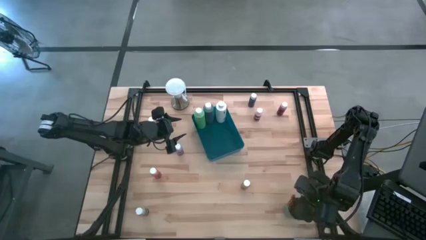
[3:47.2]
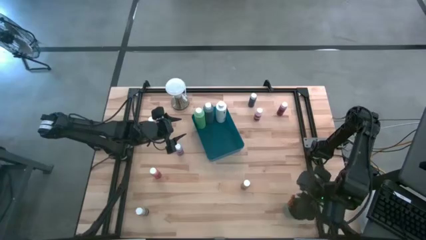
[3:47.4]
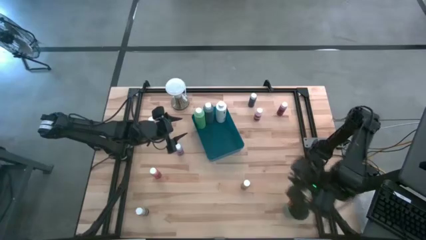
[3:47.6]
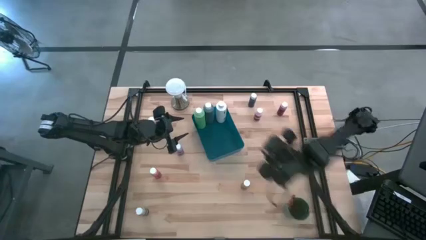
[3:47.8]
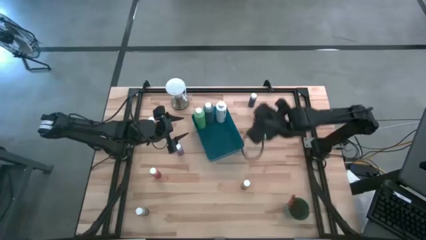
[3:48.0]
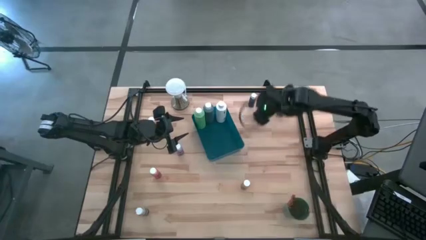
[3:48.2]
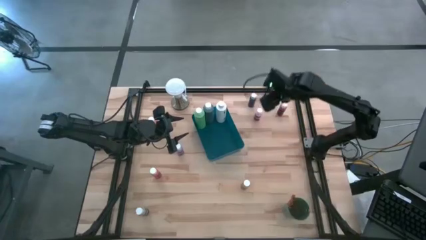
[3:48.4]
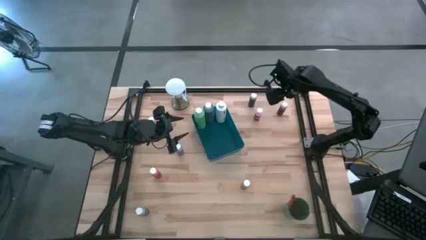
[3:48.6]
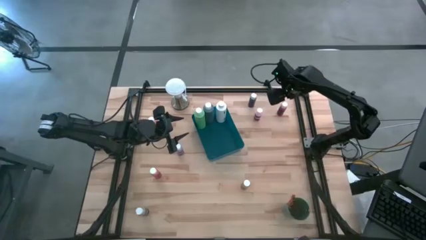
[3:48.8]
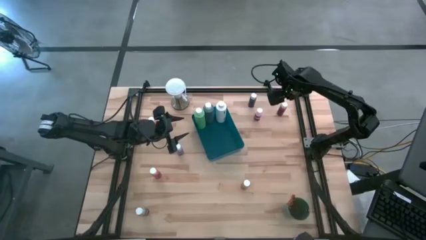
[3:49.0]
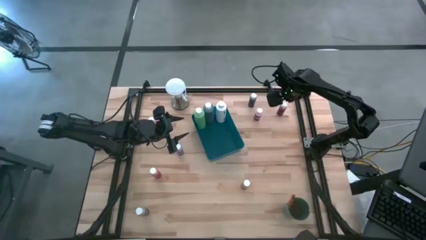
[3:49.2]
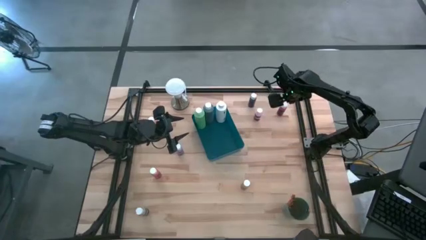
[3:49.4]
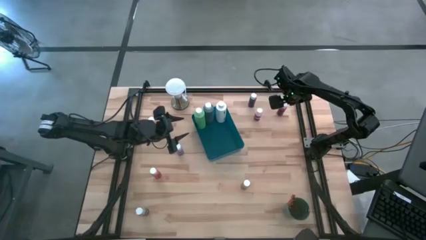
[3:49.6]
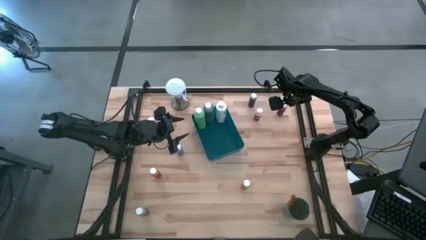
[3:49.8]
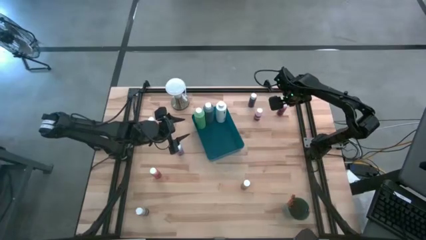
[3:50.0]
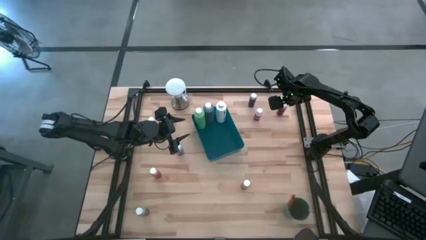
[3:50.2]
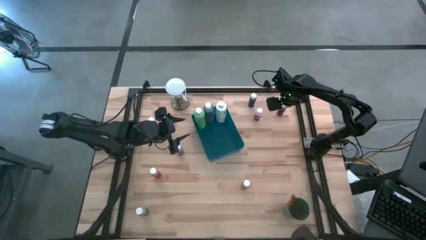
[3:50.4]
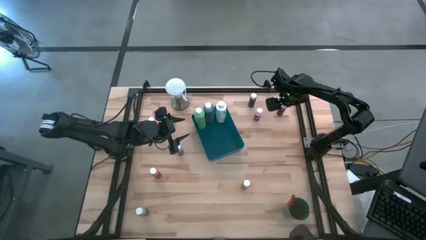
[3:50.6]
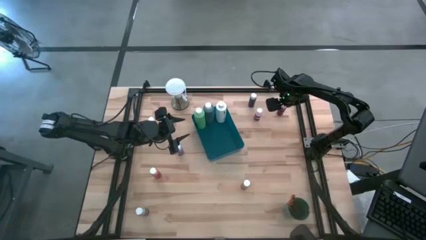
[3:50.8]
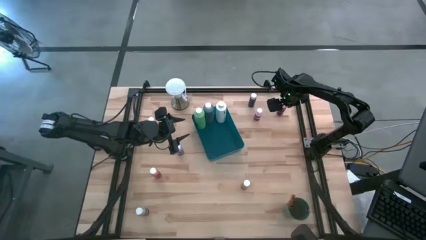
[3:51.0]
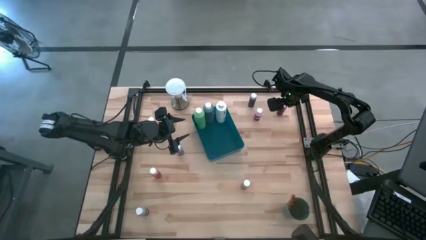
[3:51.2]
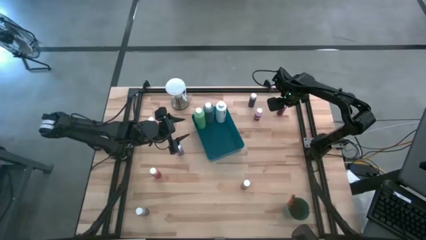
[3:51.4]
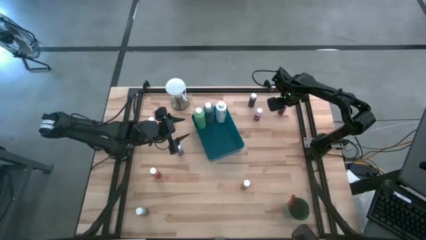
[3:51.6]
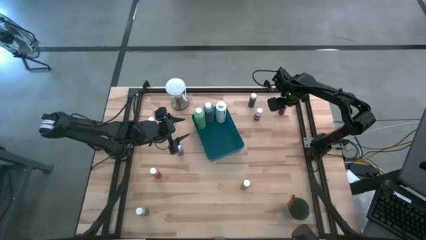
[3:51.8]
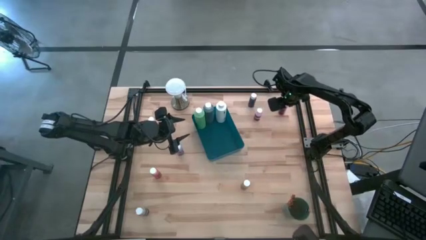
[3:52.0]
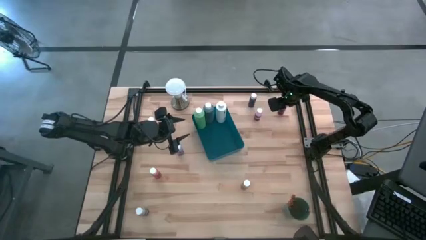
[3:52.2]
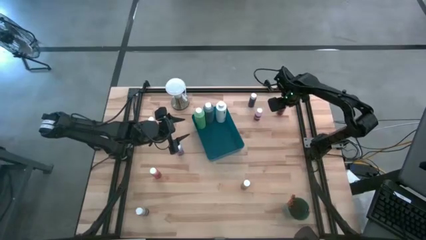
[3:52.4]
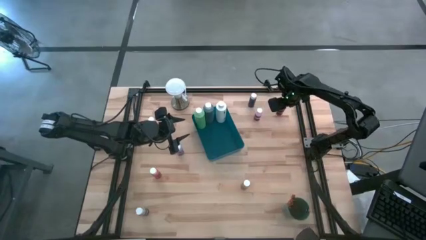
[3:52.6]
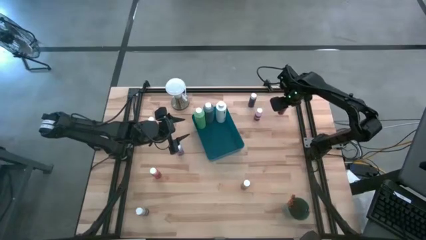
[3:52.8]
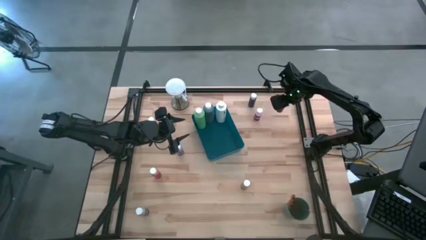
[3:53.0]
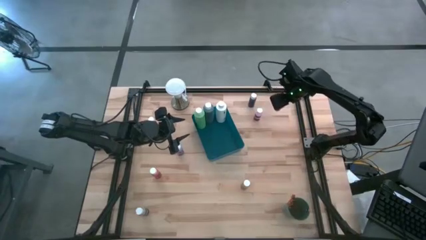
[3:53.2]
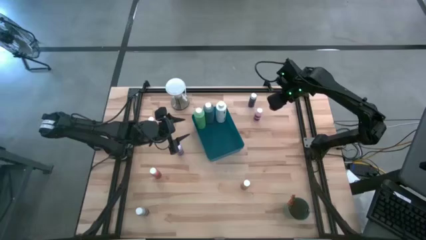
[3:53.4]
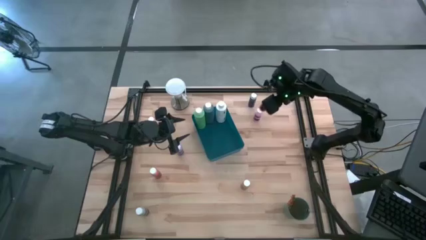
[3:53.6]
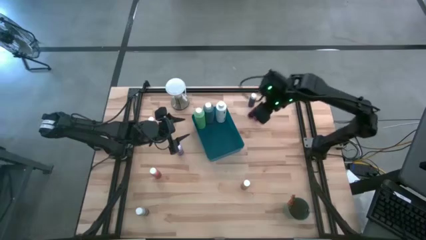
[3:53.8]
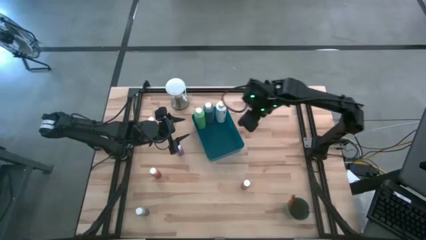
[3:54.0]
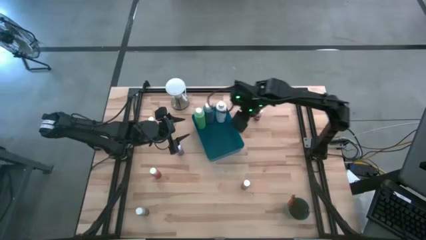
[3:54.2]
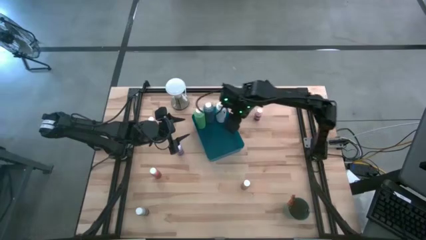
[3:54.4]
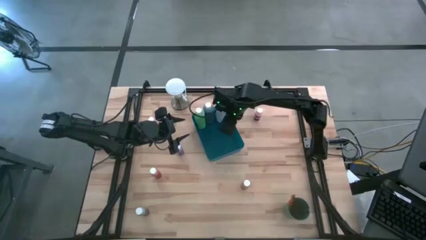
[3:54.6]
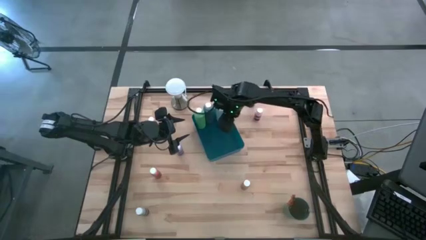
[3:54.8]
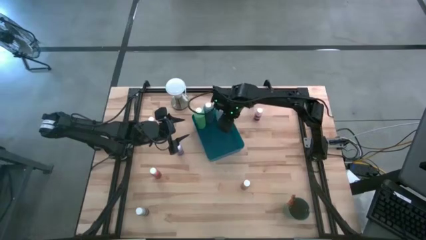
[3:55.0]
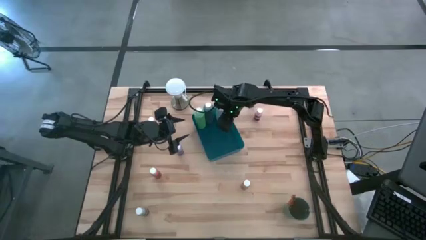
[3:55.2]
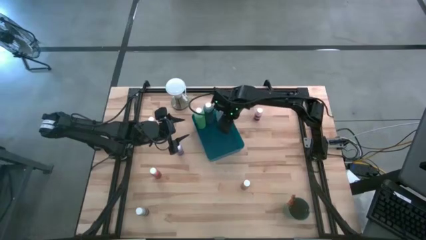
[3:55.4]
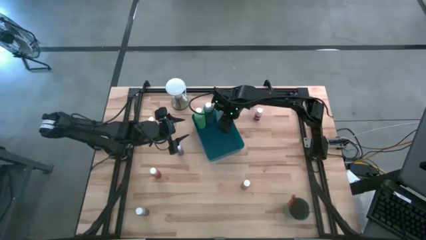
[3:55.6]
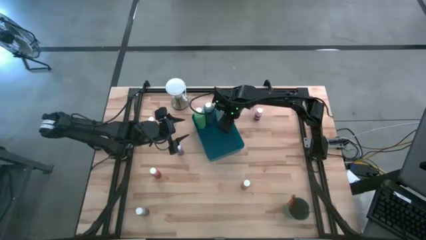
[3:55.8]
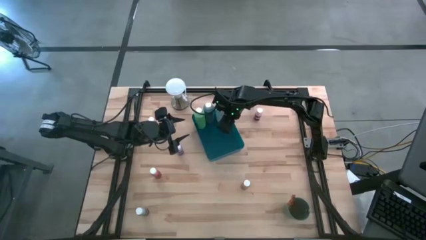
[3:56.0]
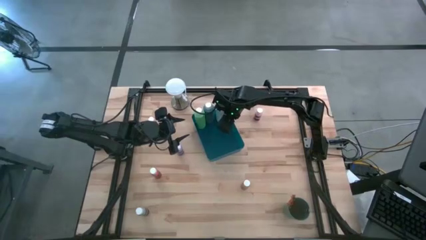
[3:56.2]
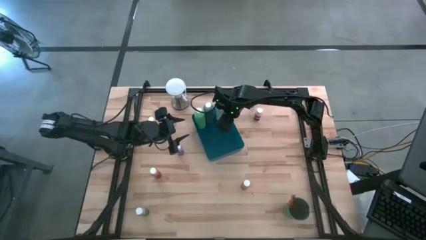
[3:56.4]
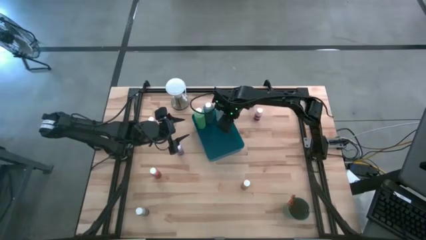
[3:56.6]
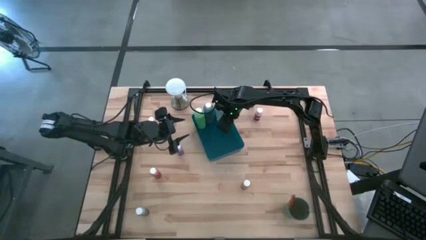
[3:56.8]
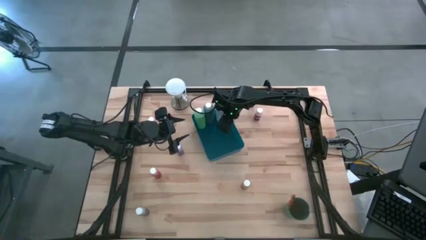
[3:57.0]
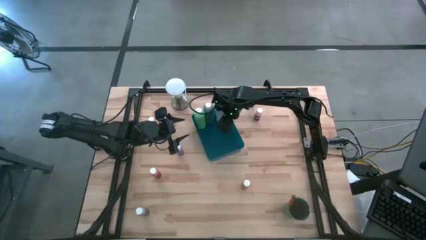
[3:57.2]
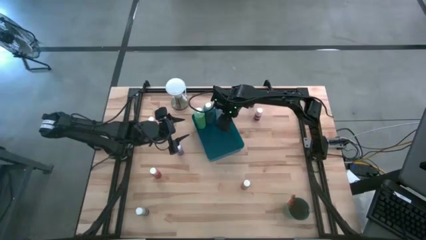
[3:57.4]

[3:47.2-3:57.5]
Task: Pick & Place Paint Supplies
Put the pink paint bottle into the blue bin

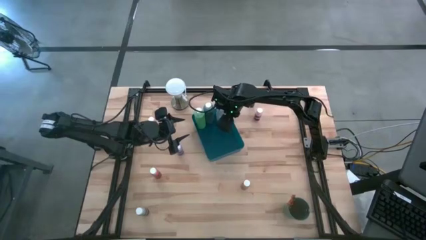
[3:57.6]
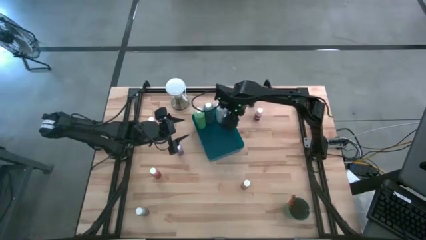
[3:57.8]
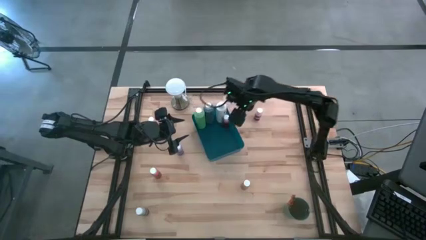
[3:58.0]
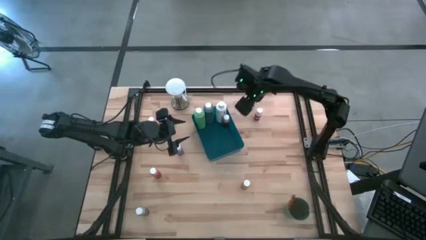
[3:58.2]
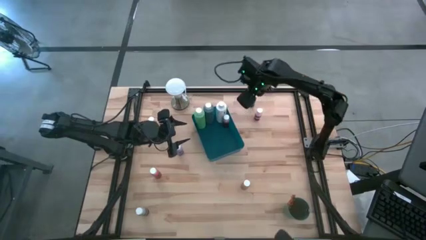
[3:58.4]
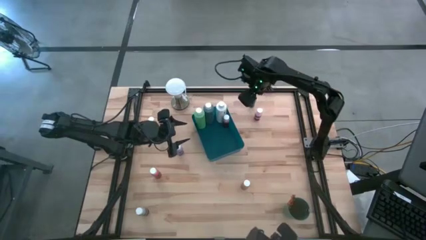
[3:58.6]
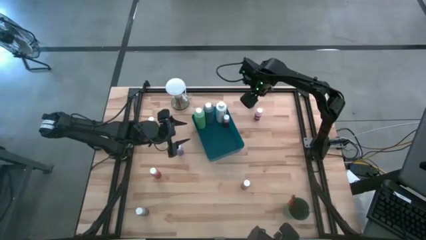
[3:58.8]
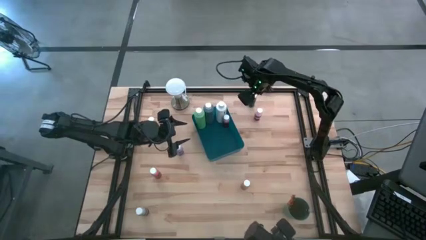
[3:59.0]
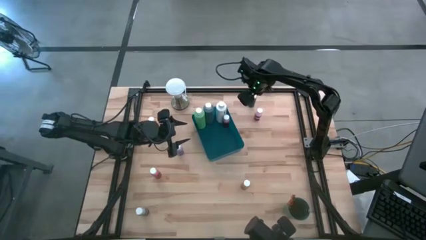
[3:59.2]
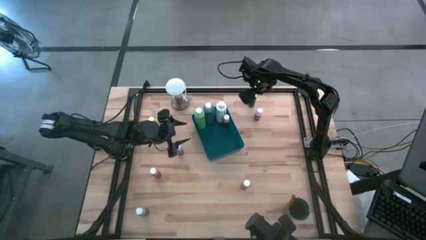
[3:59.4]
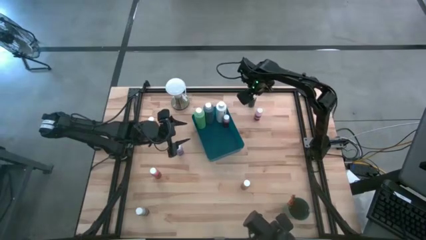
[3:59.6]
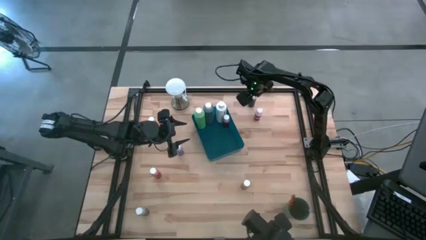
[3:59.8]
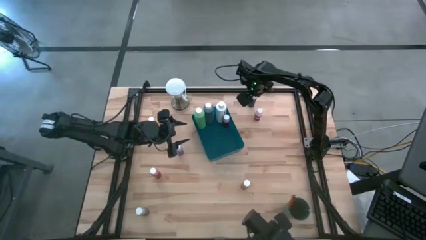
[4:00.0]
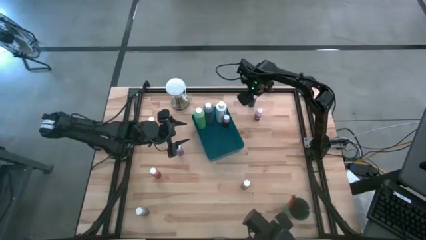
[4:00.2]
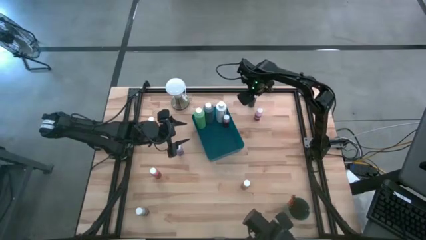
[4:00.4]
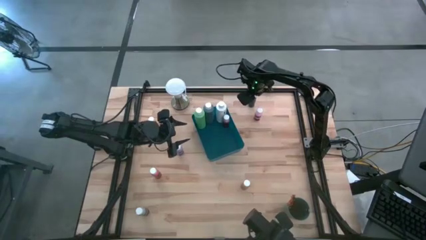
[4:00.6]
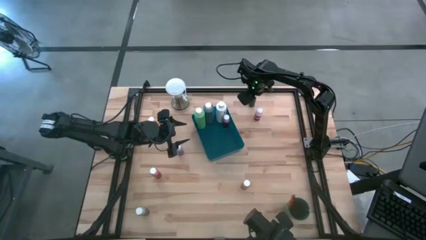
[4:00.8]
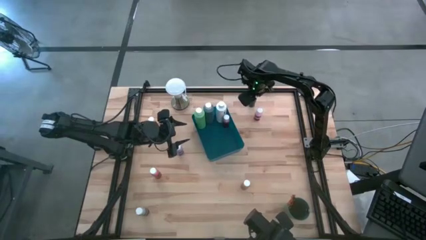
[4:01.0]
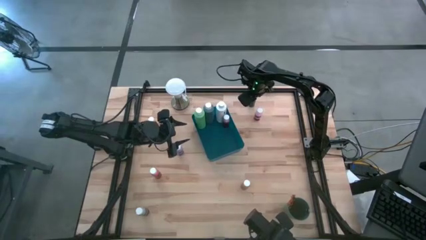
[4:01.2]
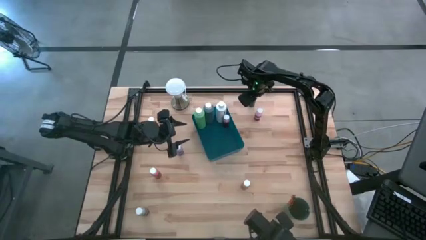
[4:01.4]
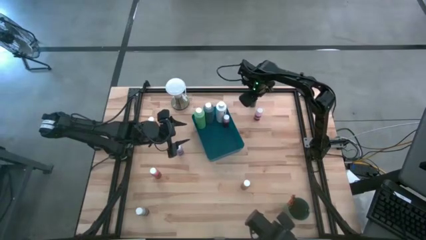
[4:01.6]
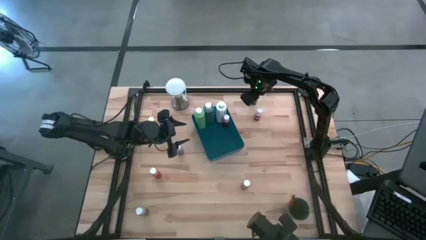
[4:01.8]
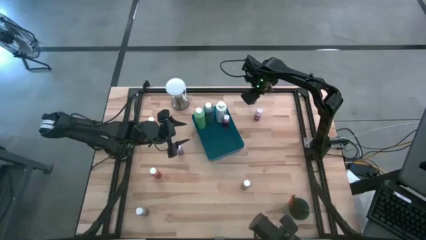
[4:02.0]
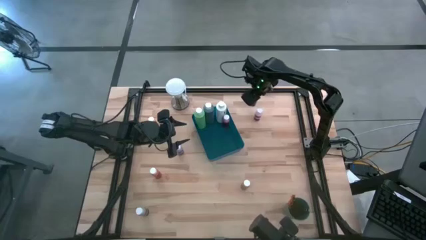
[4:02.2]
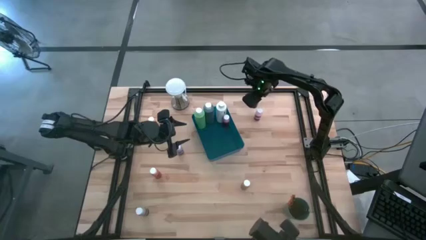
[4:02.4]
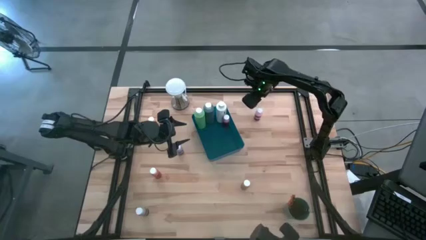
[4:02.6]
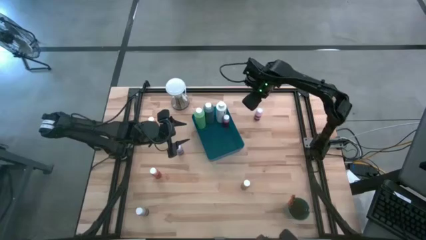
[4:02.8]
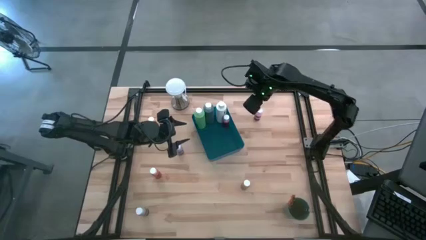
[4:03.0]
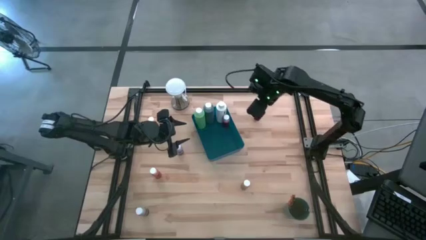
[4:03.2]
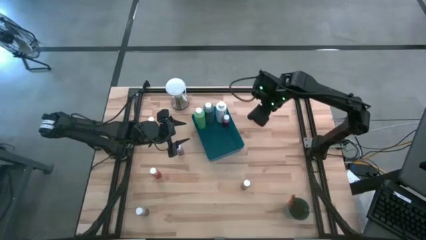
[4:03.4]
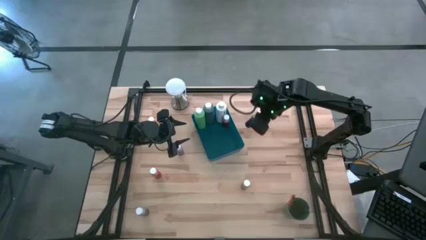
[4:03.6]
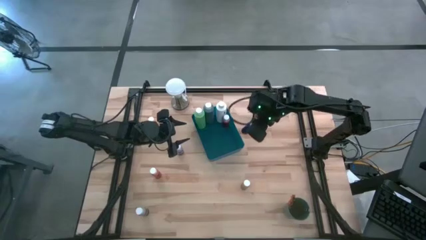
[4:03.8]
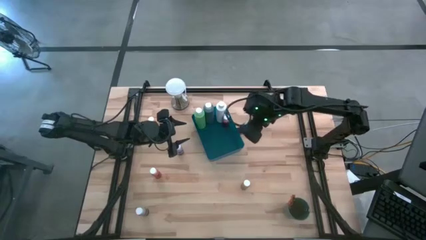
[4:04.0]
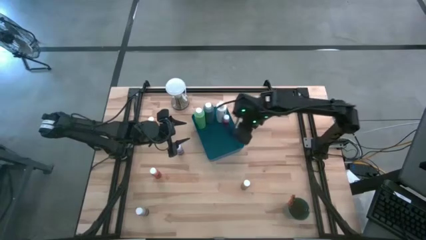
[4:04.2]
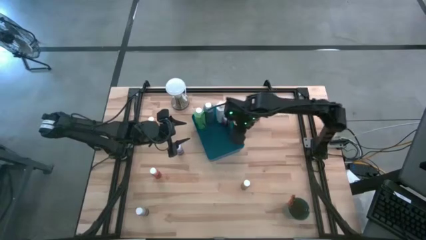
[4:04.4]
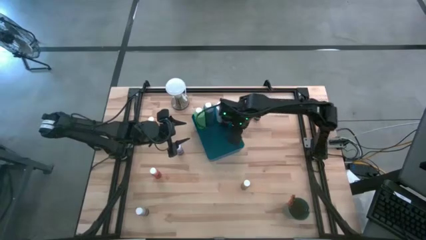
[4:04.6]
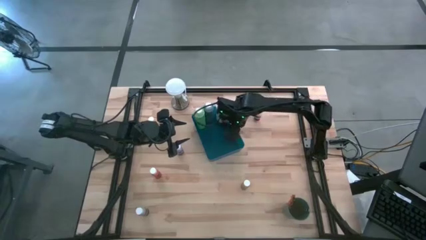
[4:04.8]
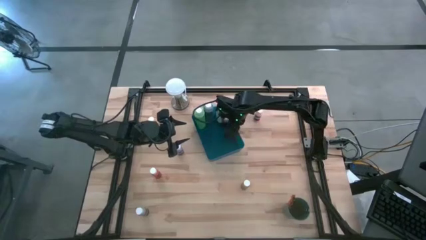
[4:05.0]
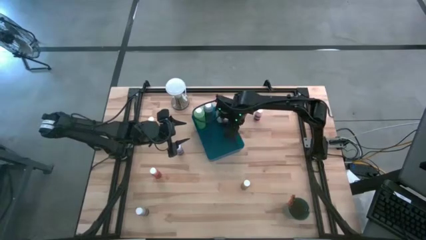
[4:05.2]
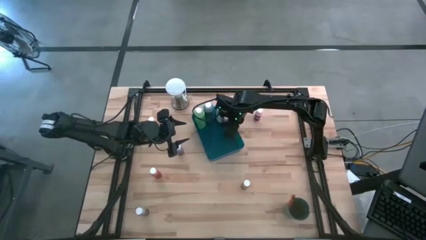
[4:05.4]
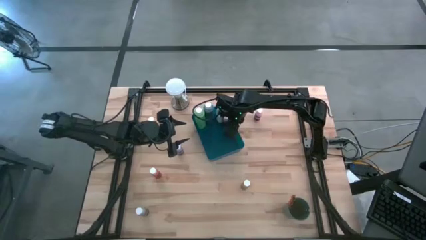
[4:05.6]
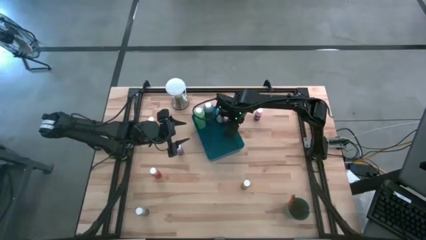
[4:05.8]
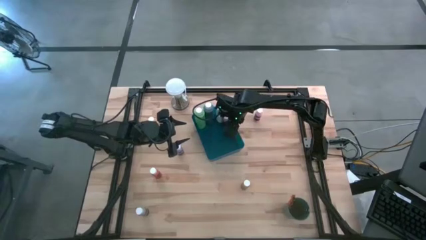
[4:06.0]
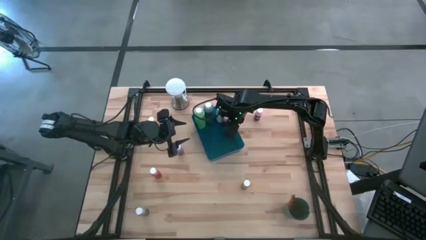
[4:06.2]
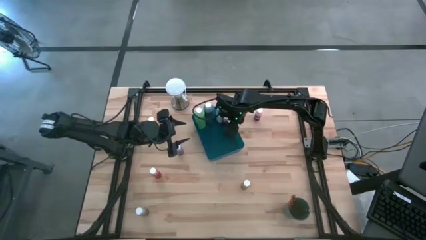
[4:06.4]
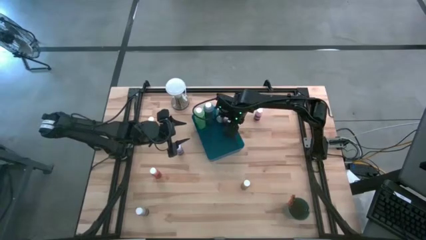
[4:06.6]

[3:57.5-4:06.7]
Put the blue paint bottle into the blue bin
